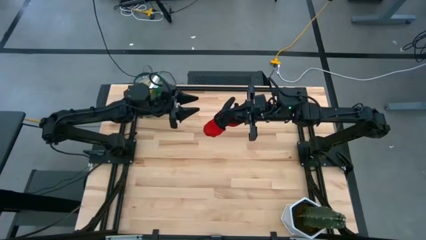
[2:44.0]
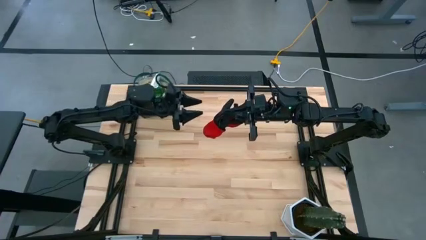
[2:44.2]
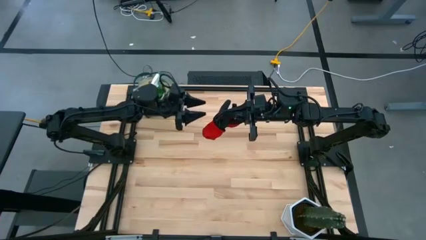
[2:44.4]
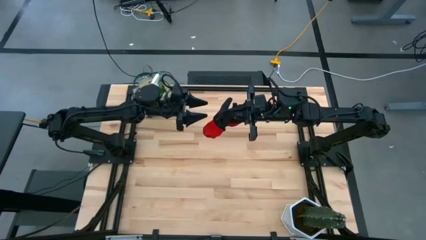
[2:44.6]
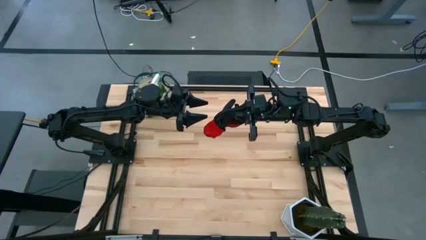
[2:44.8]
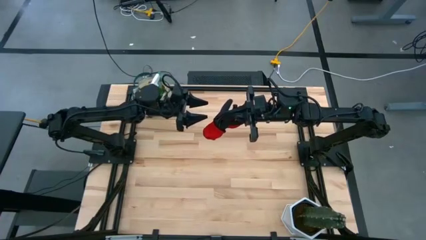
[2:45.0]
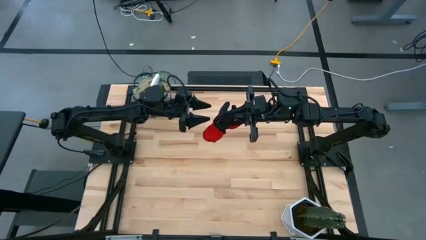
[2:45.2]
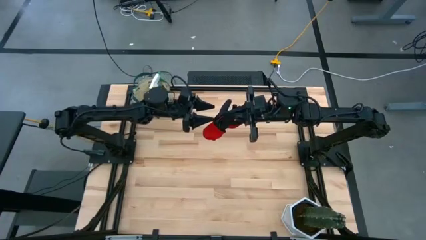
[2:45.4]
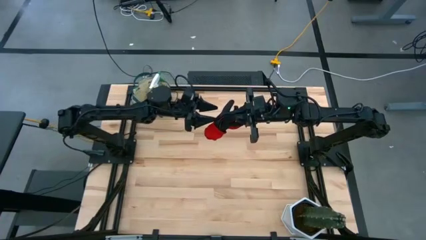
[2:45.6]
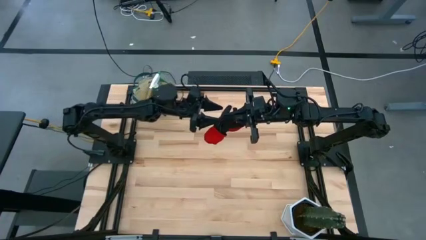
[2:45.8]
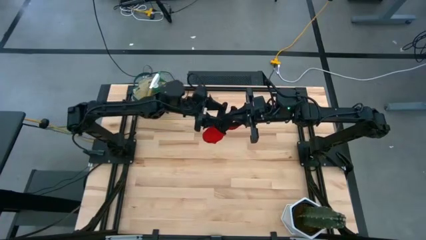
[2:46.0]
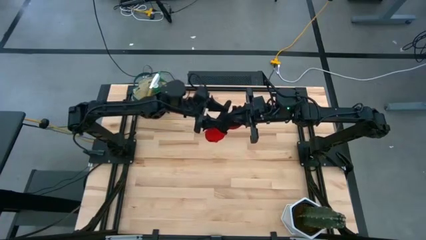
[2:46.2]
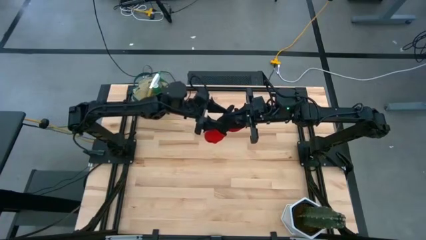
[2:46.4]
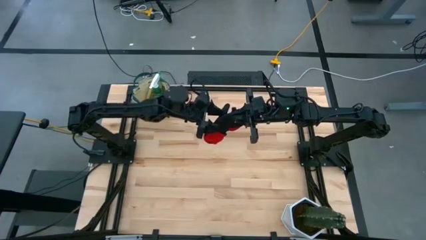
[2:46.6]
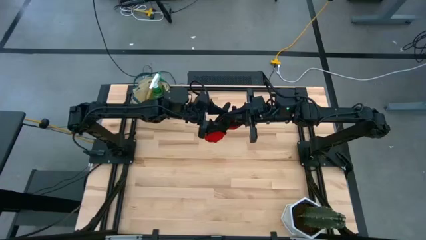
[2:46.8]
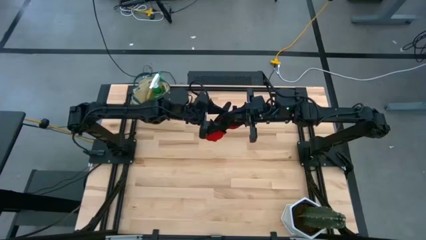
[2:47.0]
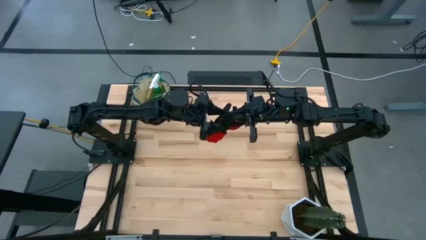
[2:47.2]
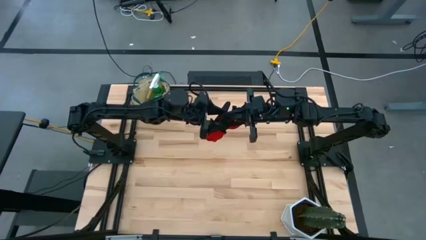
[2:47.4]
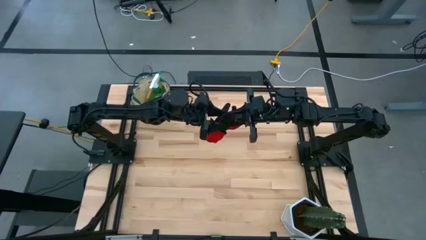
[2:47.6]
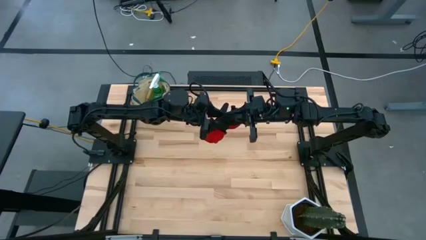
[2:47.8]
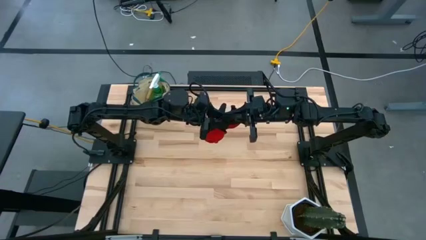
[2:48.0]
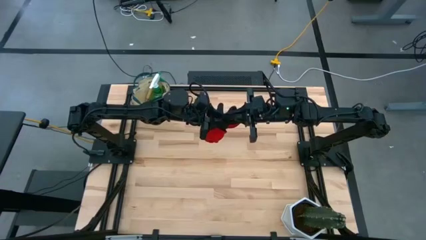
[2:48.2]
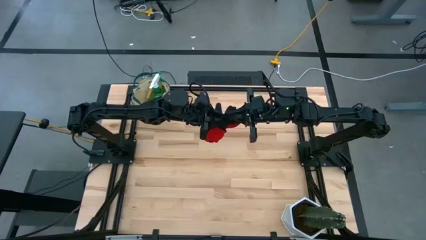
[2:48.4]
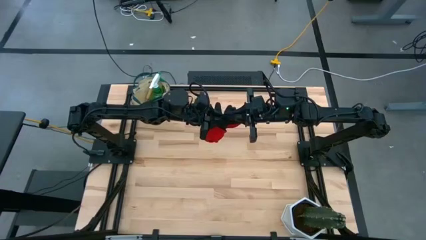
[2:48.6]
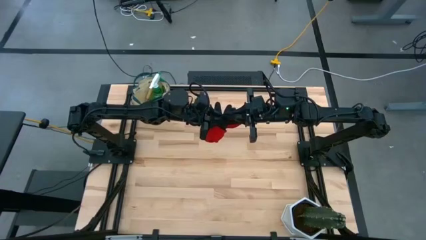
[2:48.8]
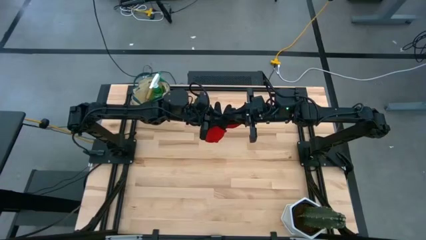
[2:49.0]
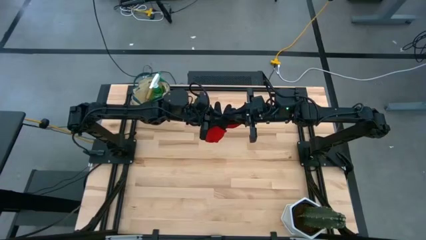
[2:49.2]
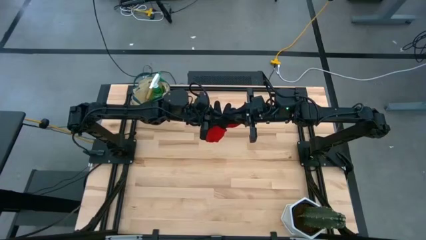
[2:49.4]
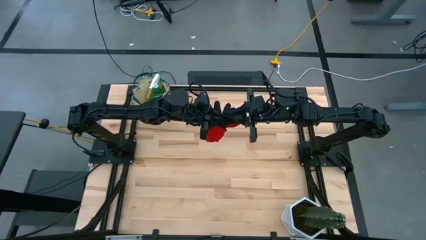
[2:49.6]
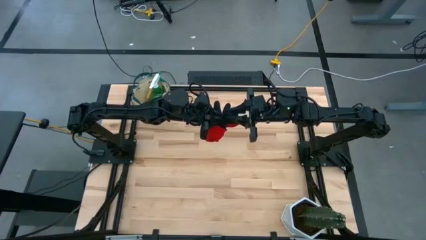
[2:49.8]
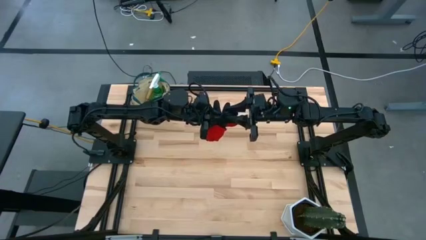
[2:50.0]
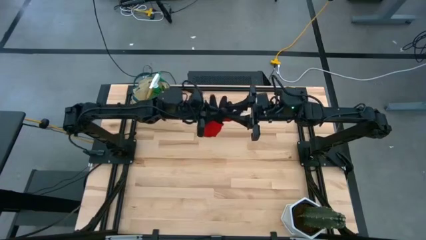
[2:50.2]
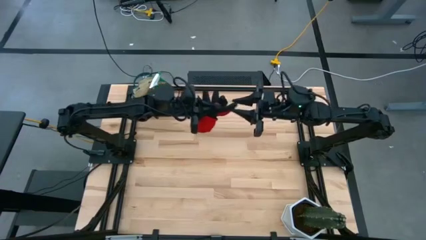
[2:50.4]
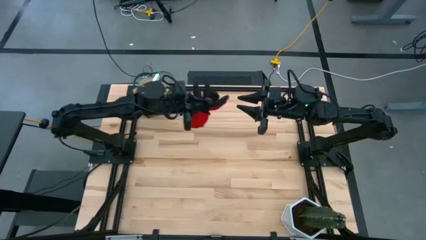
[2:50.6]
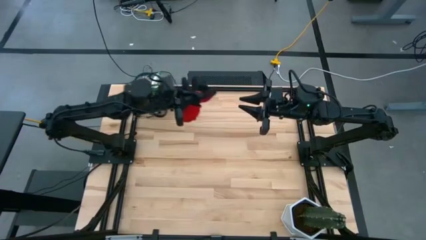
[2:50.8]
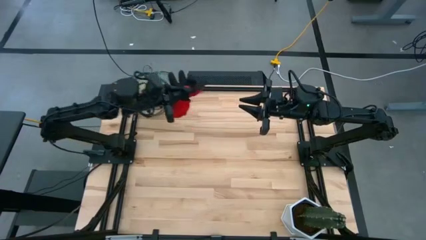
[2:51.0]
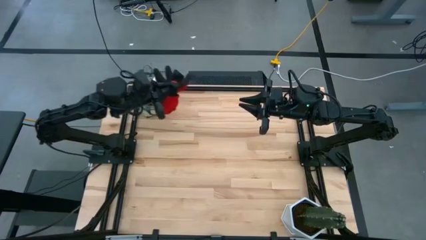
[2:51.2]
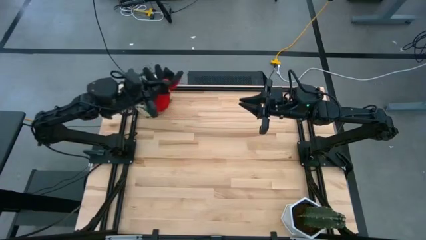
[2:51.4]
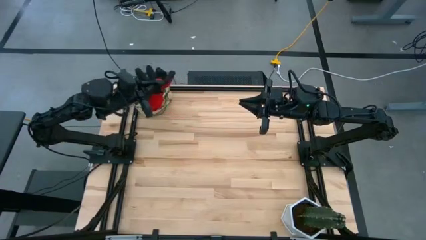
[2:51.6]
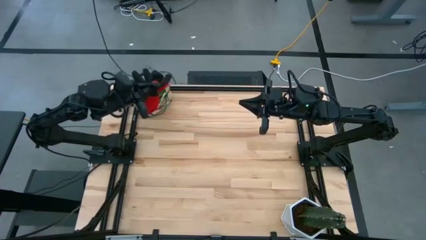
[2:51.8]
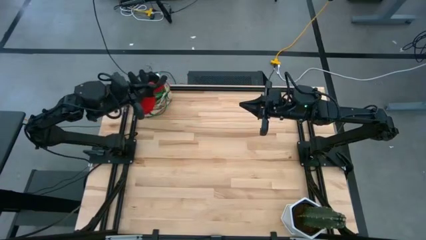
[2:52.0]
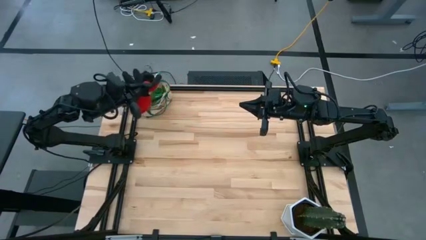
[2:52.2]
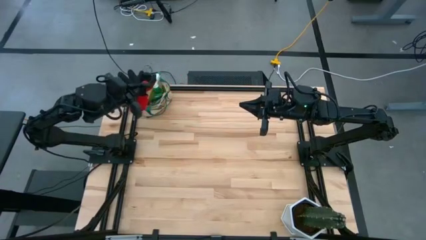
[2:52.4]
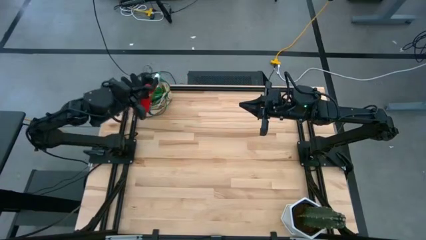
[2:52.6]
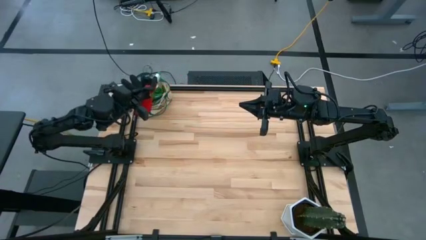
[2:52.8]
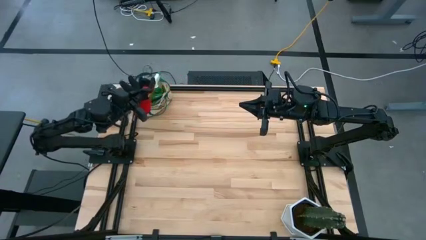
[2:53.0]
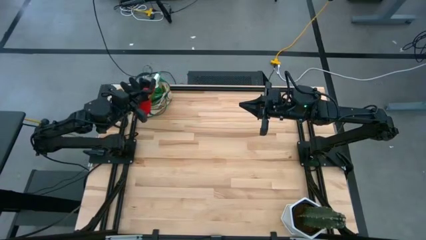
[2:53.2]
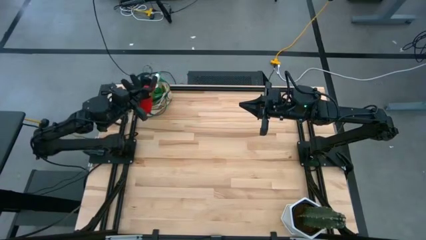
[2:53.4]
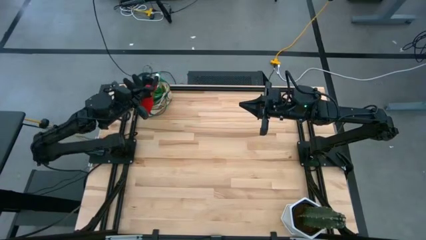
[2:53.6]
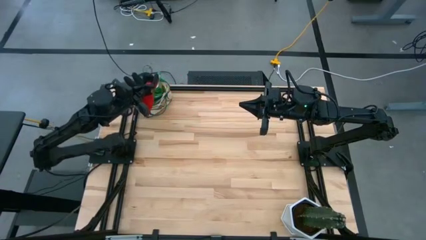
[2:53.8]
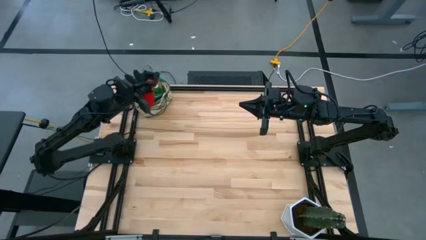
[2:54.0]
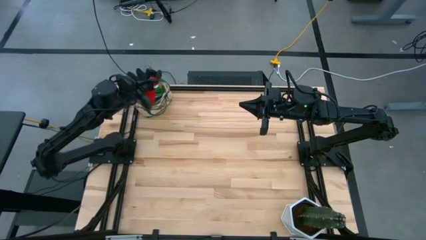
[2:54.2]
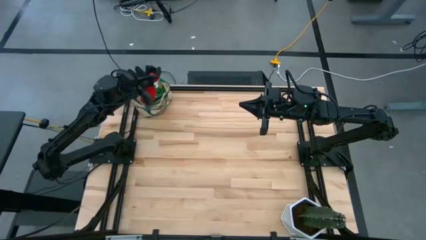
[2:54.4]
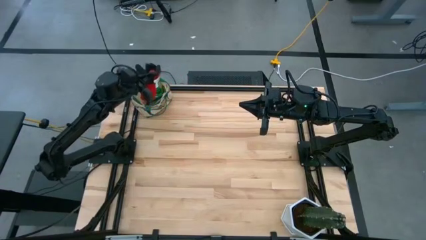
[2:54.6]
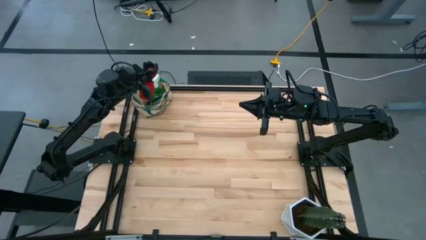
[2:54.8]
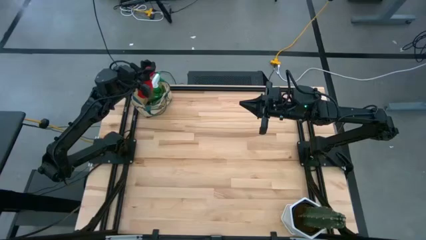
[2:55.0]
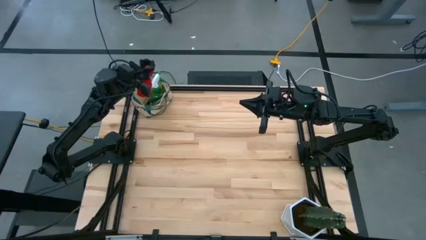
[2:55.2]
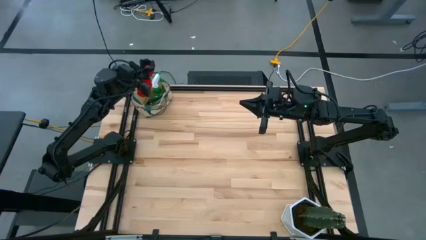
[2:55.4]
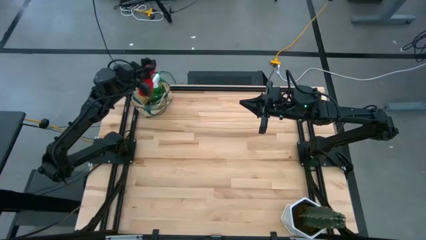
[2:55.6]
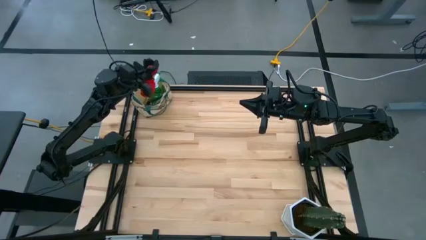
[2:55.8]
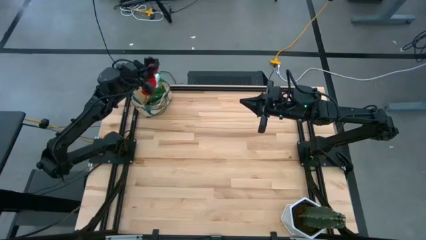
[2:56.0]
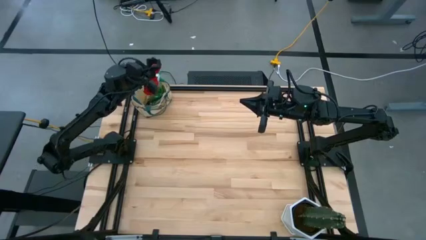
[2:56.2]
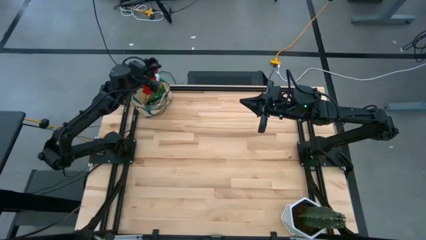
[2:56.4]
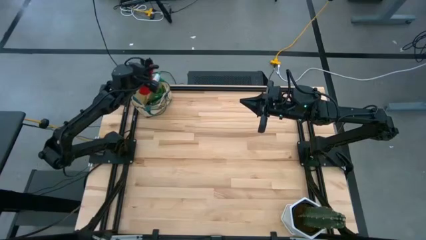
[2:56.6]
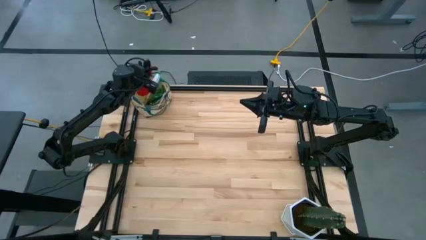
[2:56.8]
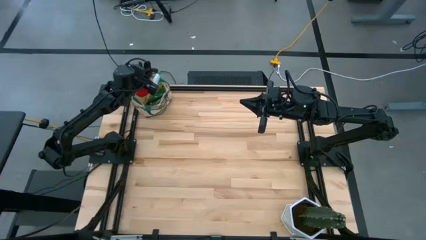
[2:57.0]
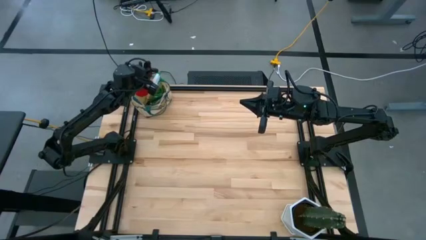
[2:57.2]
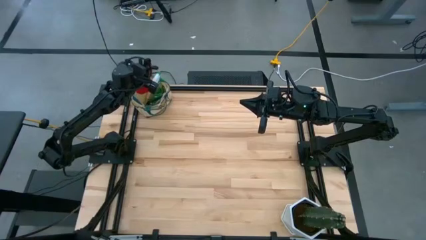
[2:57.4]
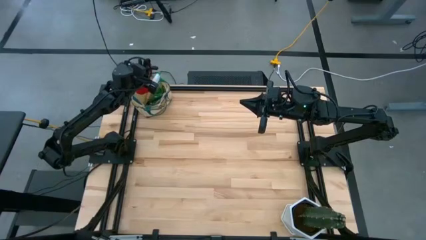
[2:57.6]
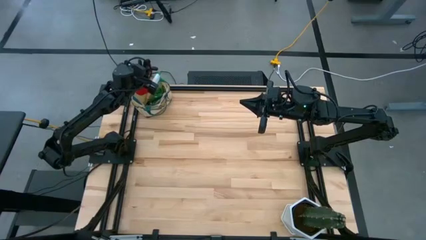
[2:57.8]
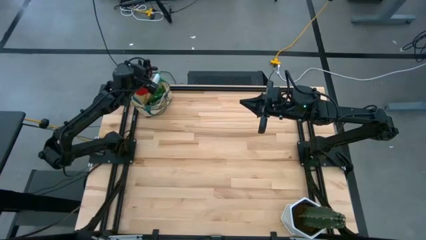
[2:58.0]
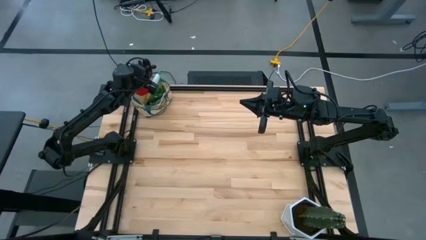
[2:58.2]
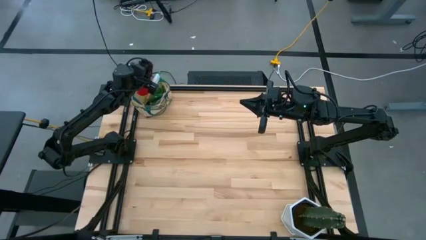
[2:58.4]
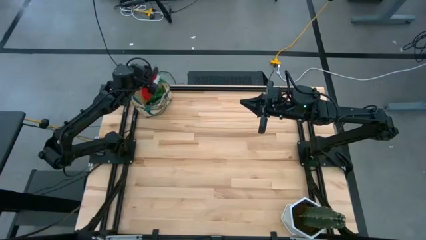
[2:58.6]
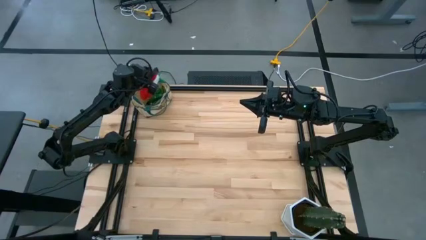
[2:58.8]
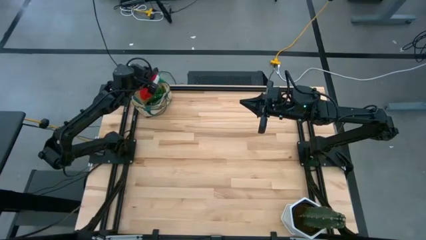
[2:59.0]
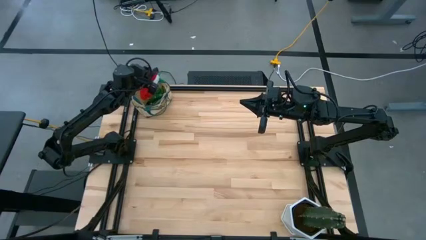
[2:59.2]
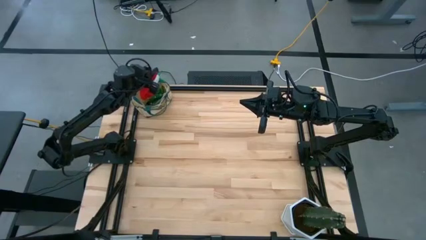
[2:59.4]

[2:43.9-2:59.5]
Task: Pick & Place Garden tools in Gardening bag
Put the red gloves into the gardening bag
